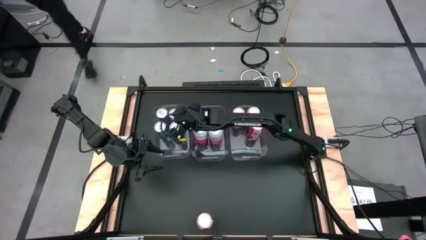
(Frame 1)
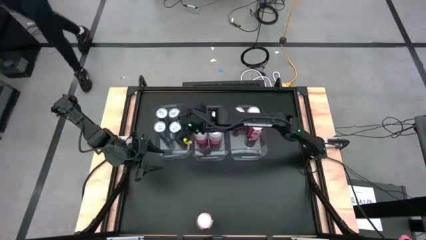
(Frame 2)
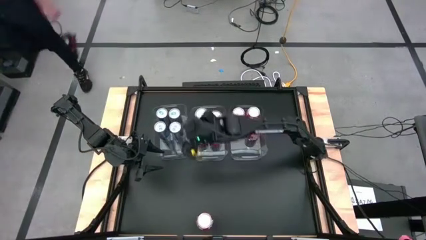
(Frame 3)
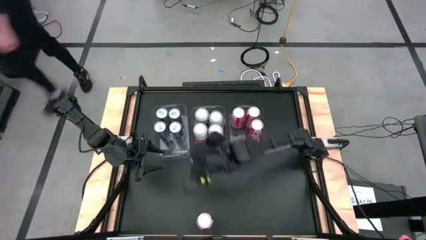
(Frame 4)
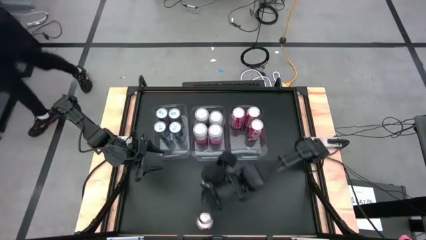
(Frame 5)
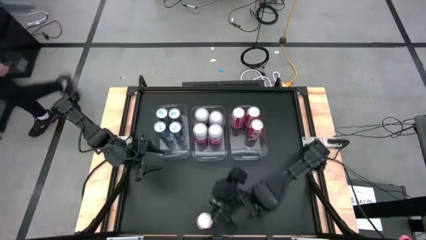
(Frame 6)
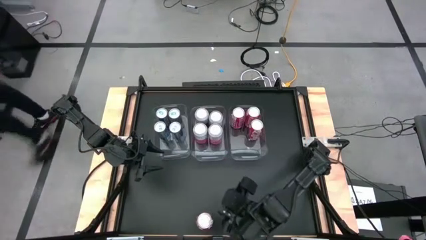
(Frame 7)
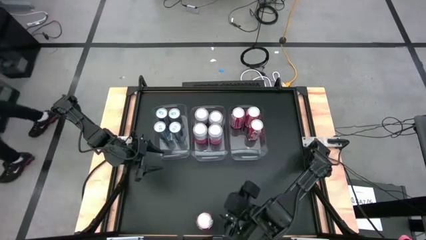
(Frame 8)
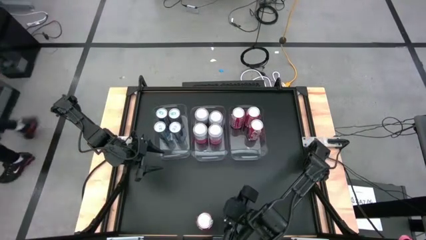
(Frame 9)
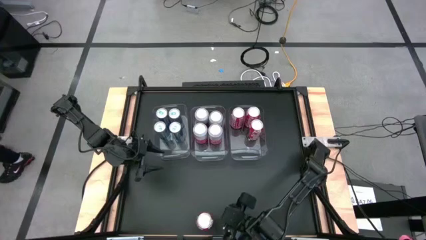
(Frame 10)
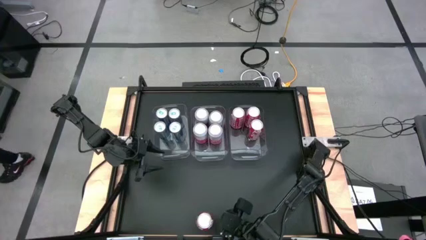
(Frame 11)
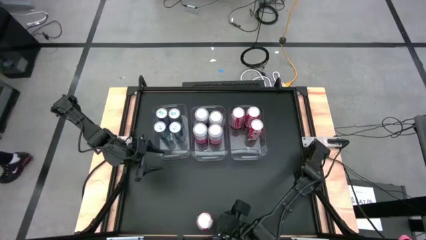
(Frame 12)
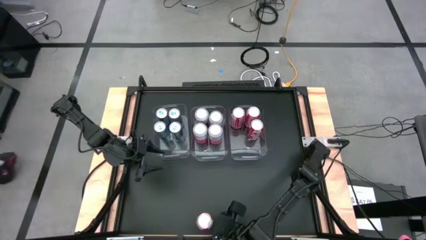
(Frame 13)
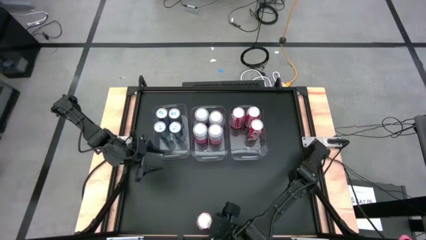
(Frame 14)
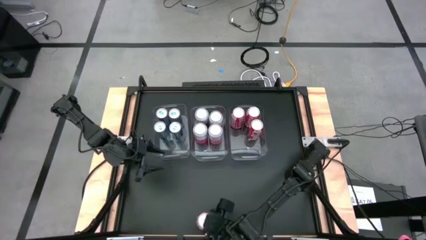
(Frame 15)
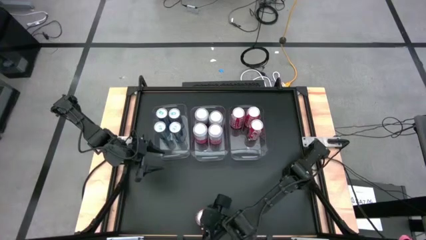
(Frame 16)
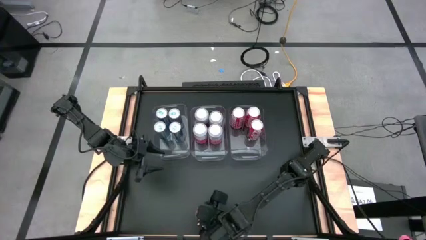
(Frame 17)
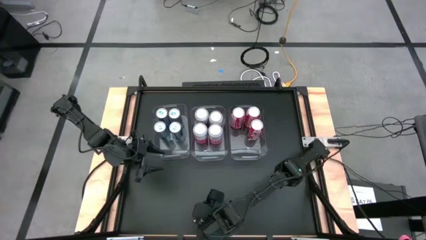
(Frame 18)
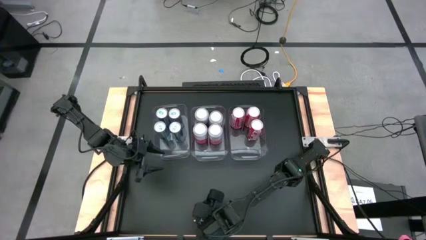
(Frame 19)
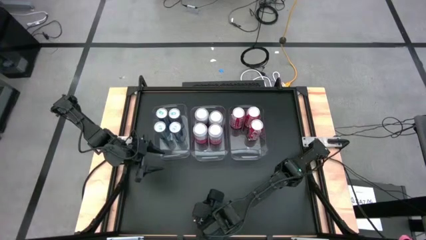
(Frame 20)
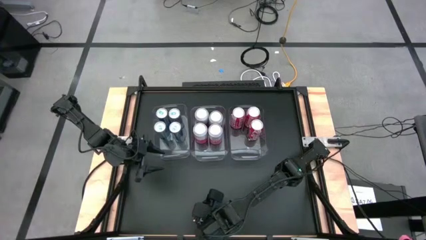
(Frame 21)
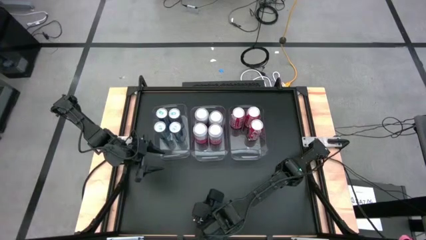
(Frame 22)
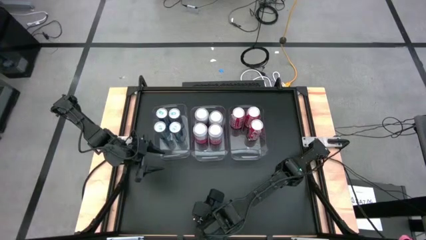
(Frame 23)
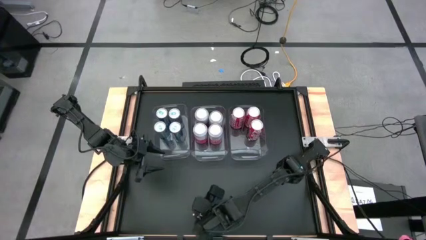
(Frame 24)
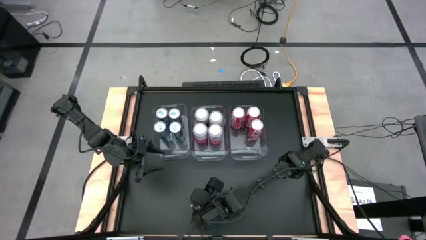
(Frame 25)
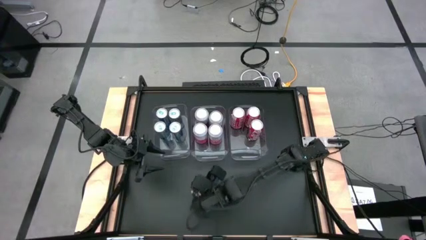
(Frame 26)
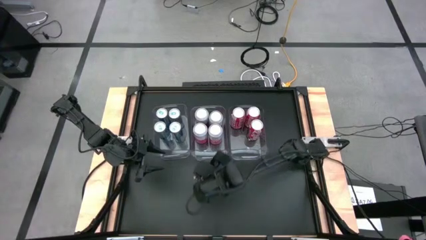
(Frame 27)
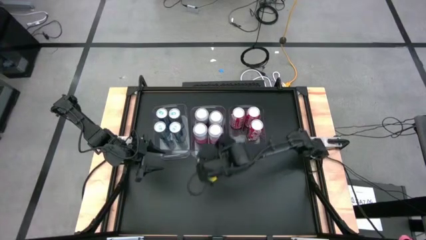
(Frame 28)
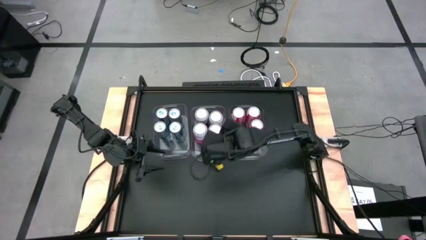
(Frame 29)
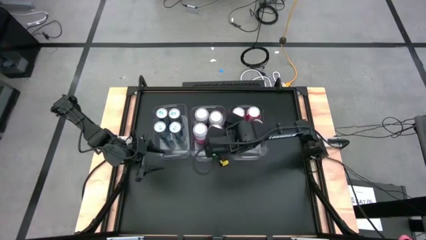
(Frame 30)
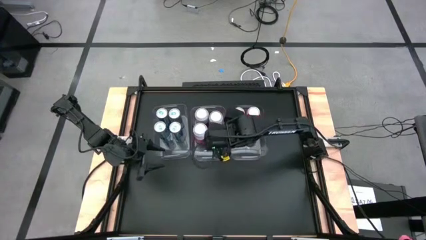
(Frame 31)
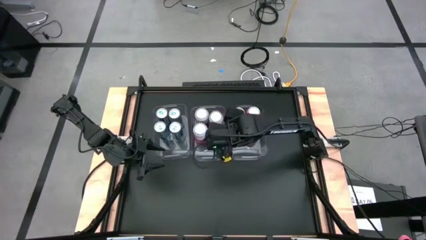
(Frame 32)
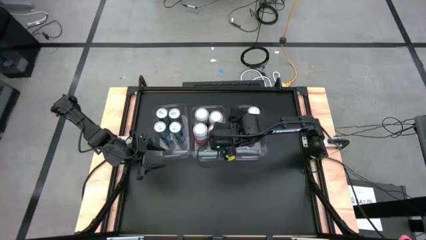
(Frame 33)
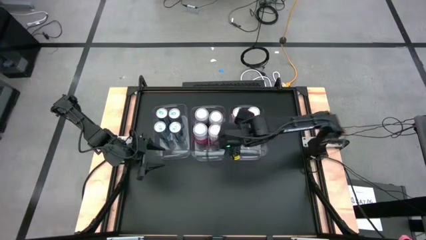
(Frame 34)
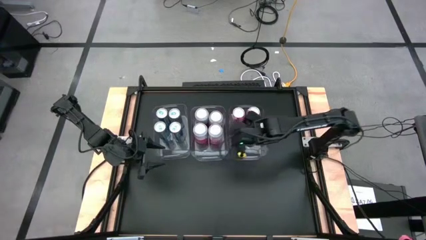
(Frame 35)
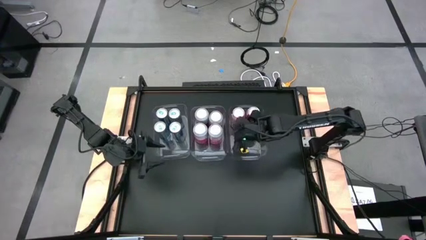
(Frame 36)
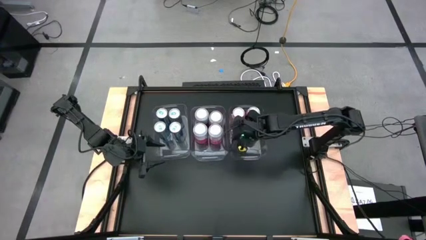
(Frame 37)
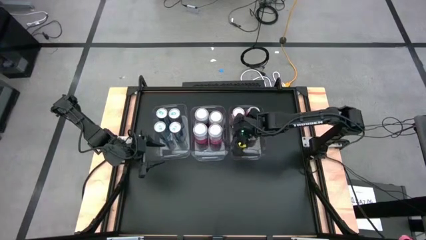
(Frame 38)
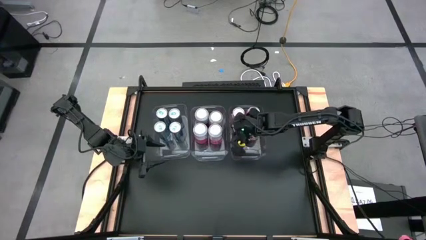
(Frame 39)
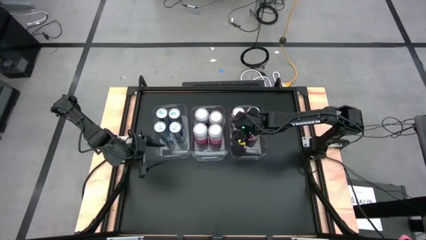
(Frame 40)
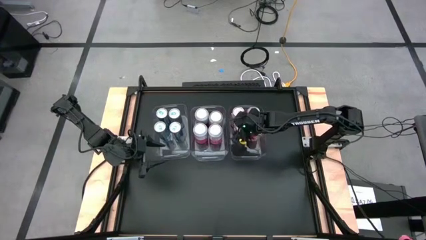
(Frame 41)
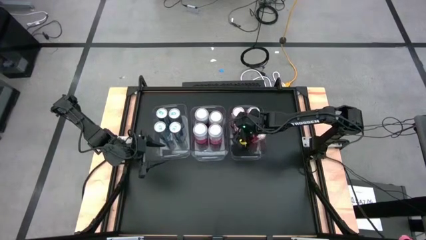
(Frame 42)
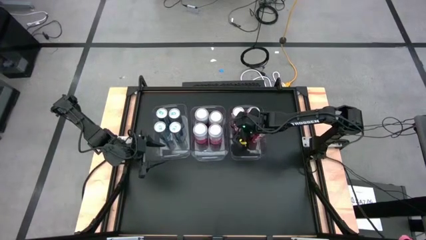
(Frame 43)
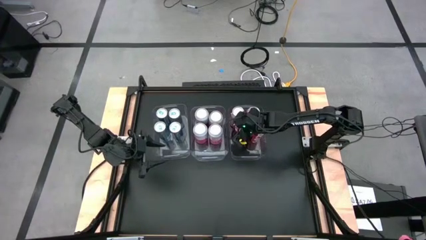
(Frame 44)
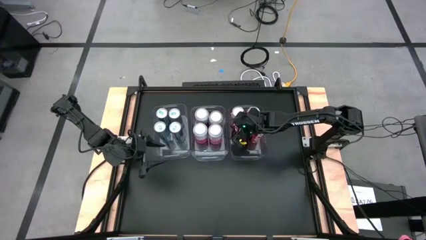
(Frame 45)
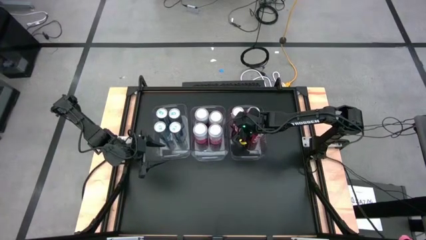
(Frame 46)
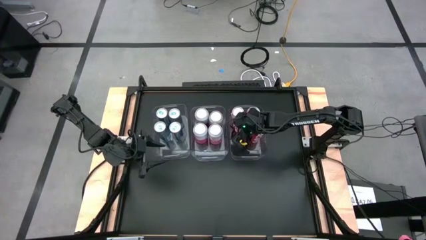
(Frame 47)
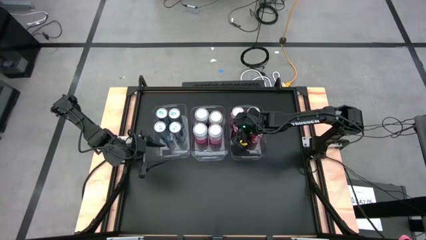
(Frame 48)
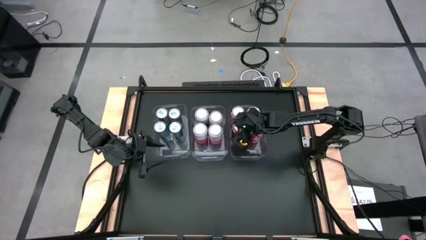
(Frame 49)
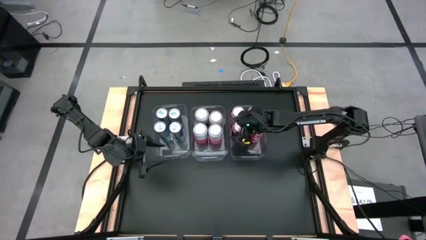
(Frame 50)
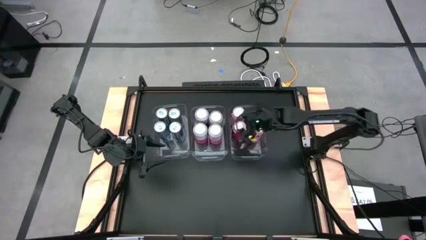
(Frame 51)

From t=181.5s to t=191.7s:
Task: Sort soda cans
Put the red-white soda can into the right transparent bin

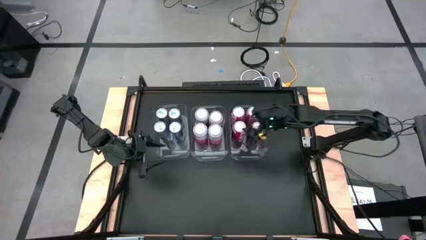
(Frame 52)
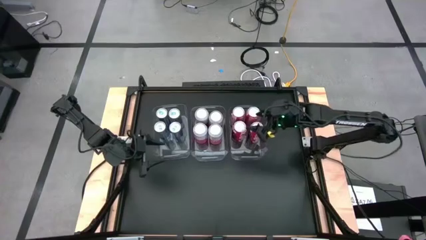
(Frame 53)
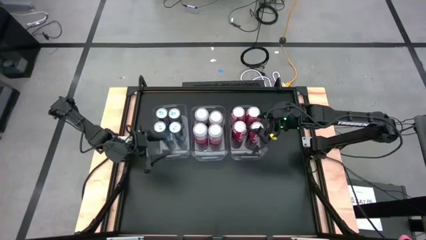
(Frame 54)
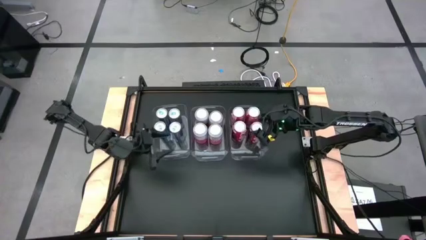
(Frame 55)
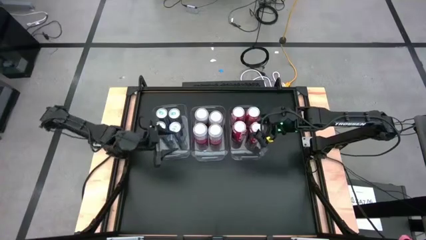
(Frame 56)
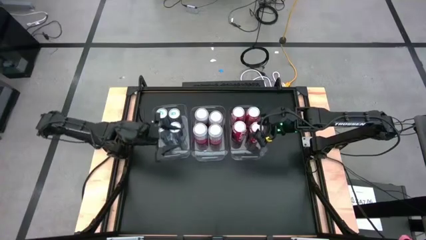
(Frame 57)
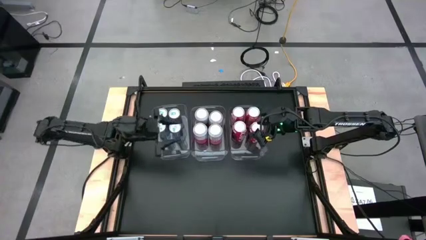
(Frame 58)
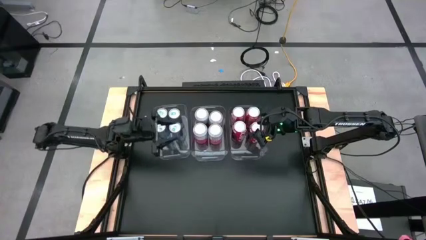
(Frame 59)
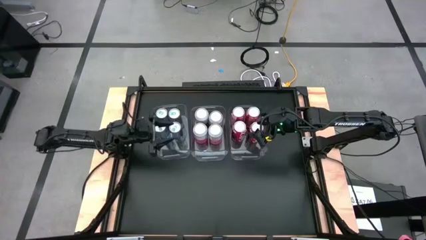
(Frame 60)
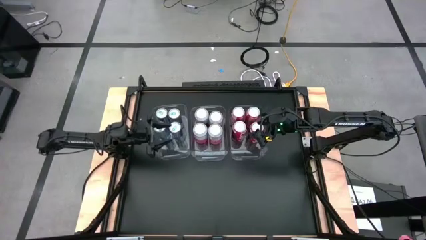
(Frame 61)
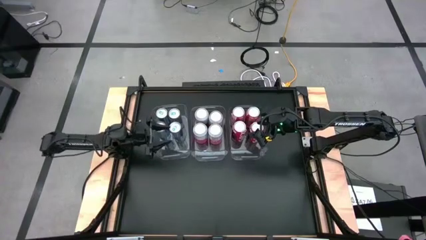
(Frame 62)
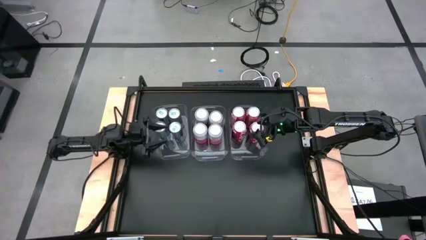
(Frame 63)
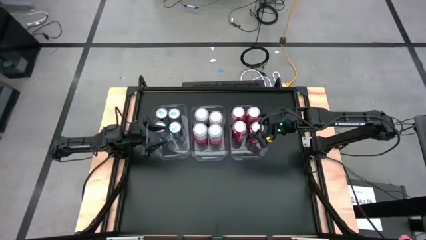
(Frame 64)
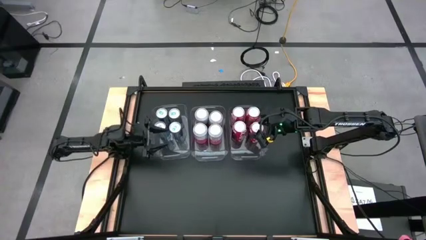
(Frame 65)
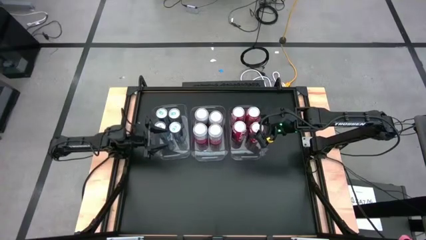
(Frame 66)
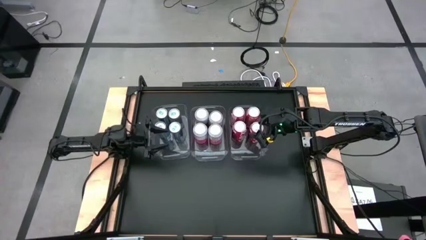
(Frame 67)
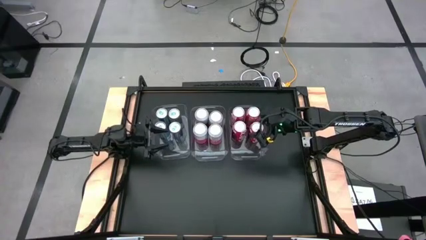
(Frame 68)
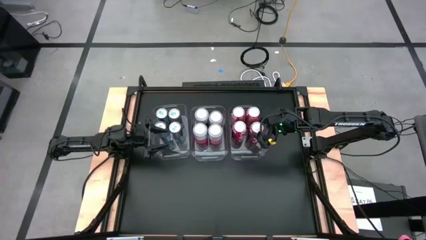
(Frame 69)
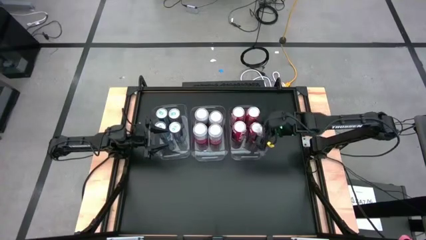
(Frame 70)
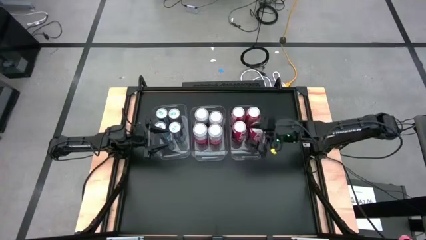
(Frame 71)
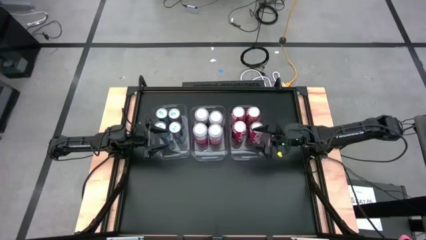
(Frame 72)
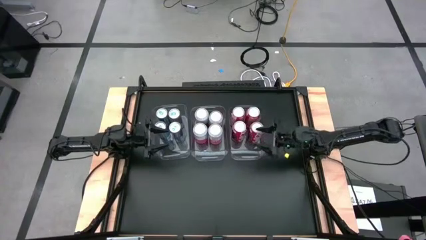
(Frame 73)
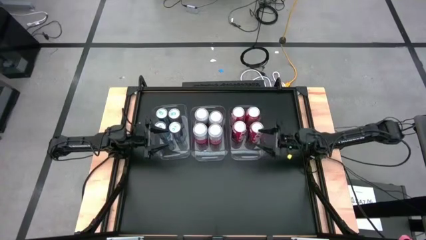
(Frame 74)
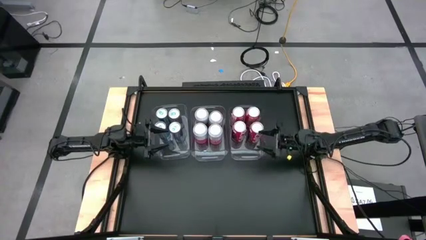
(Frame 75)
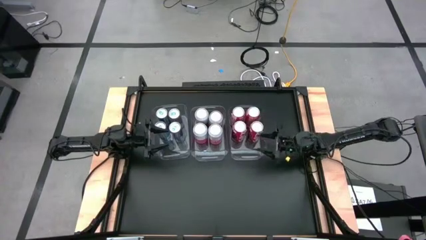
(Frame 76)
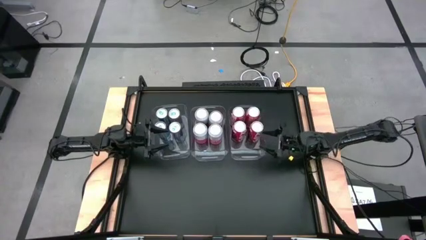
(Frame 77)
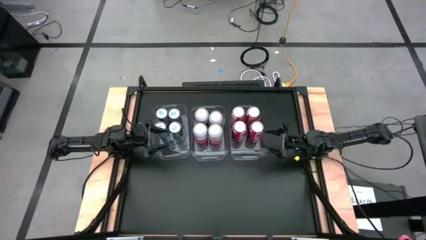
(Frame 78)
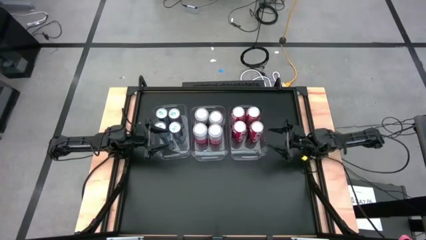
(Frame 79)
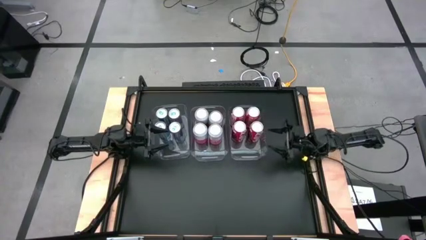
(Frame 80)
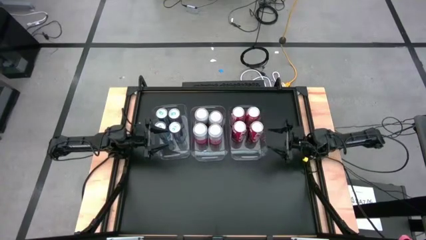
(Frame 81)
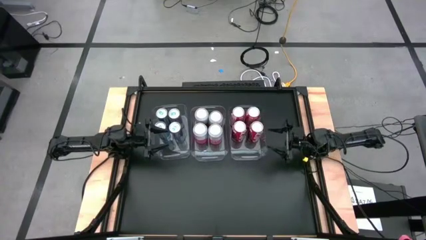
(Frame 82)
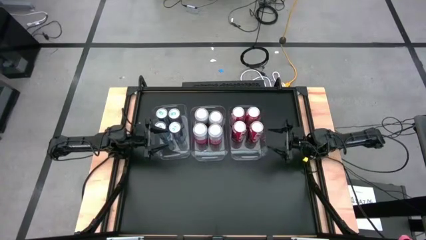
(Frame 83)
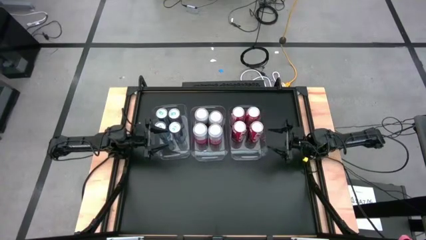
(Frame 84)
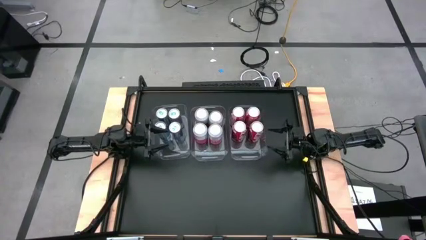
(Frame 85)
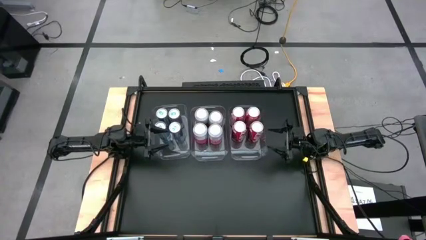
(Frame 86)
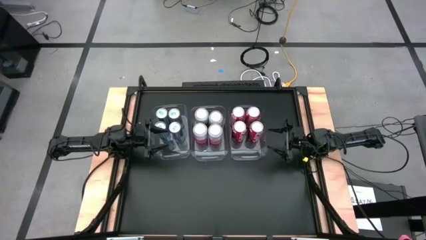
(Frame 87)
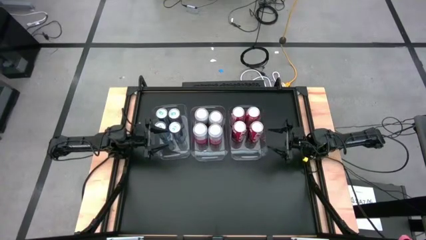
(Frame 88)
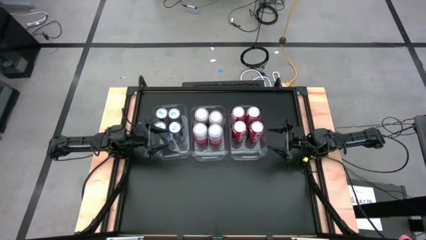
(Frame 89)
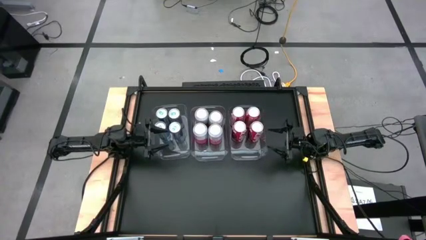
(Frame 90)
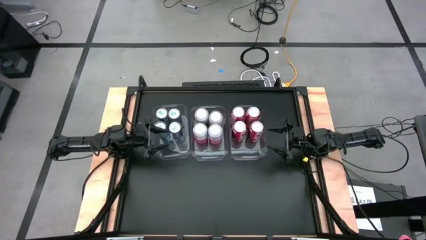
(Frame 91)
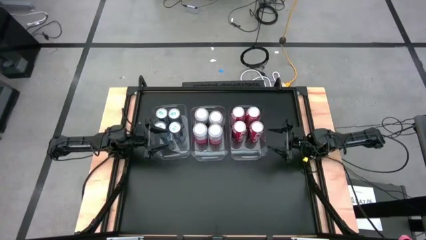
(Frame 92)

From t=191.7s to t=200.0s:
Return to Home Position
